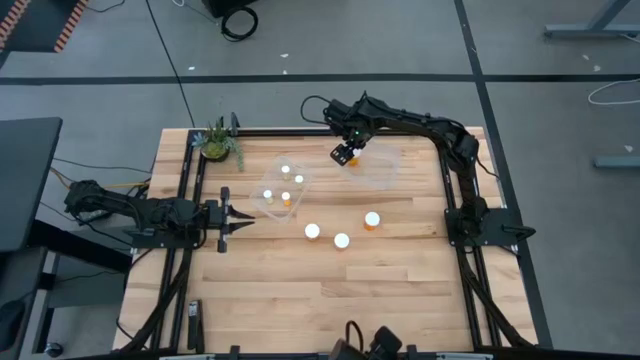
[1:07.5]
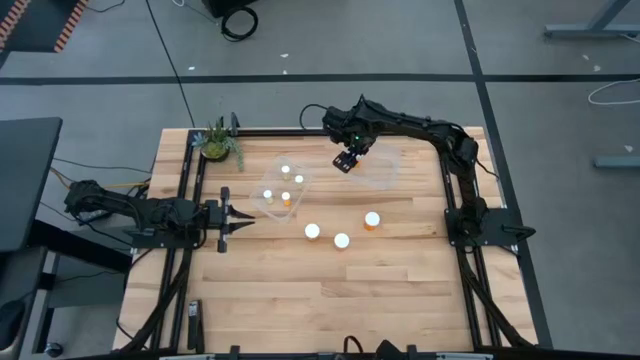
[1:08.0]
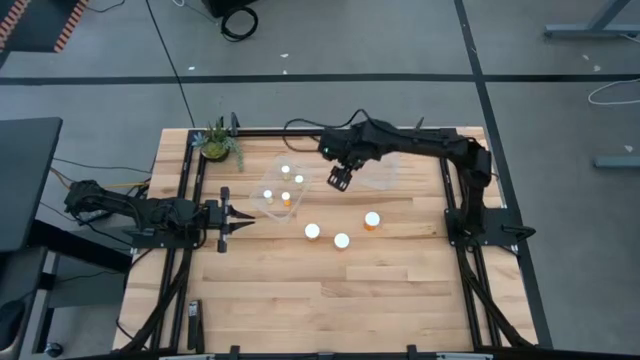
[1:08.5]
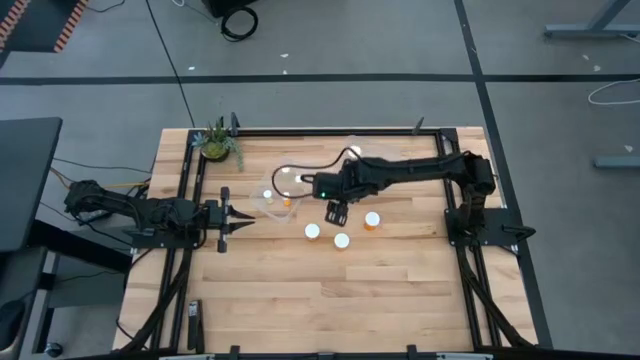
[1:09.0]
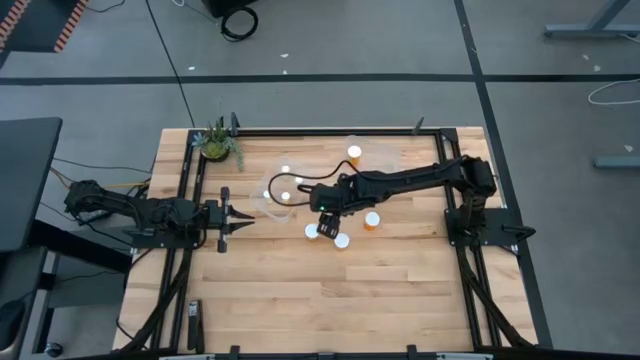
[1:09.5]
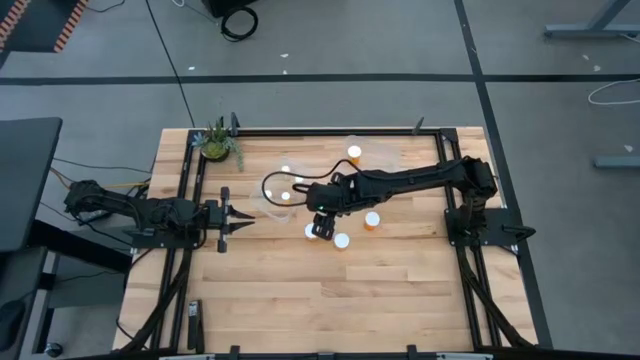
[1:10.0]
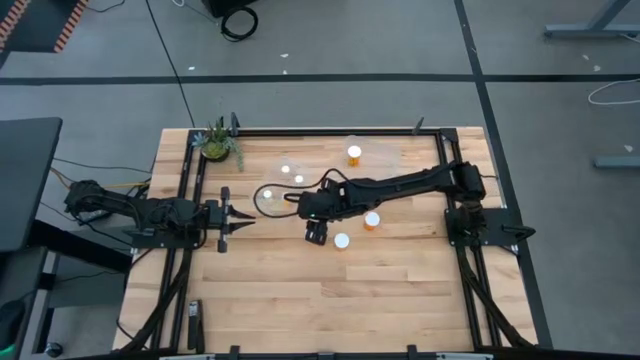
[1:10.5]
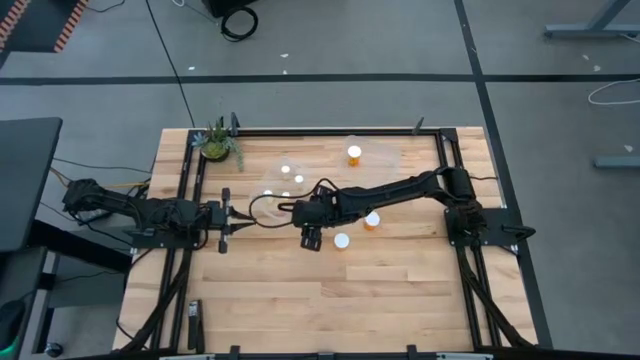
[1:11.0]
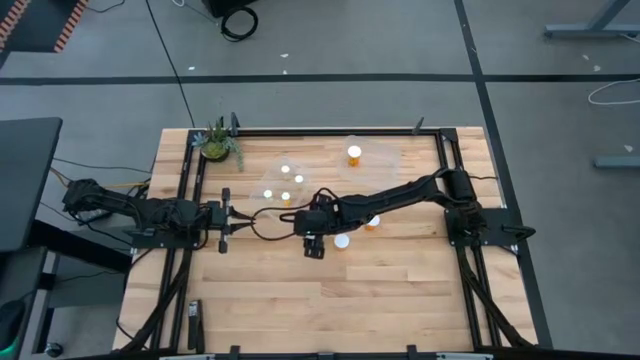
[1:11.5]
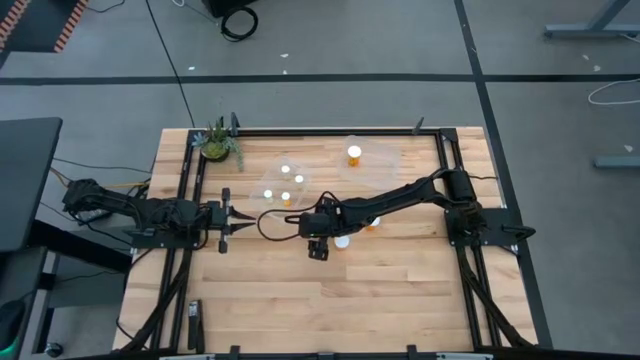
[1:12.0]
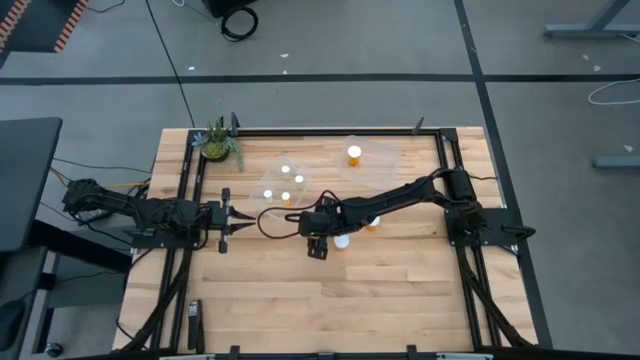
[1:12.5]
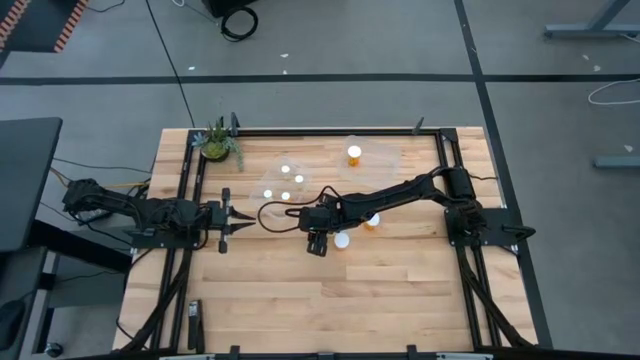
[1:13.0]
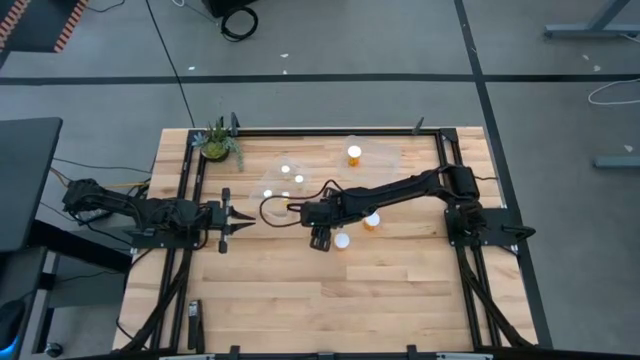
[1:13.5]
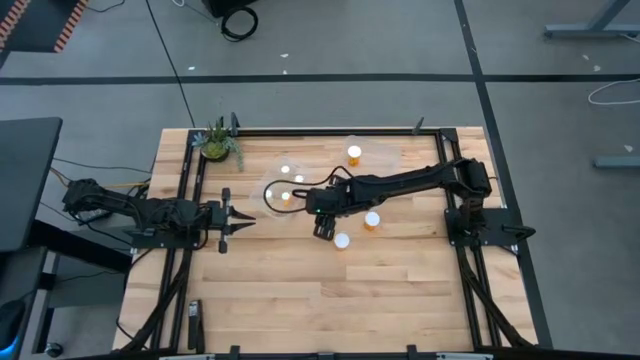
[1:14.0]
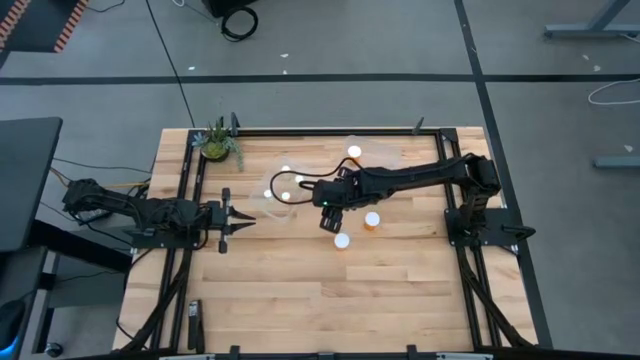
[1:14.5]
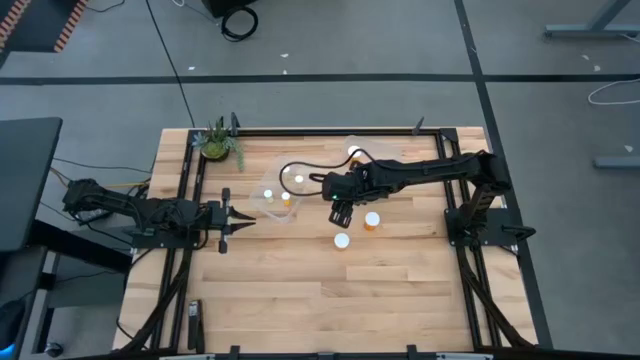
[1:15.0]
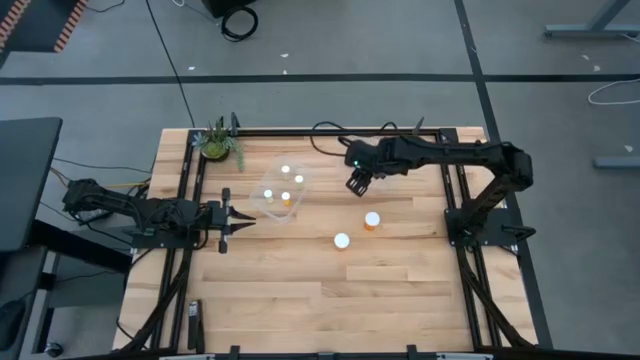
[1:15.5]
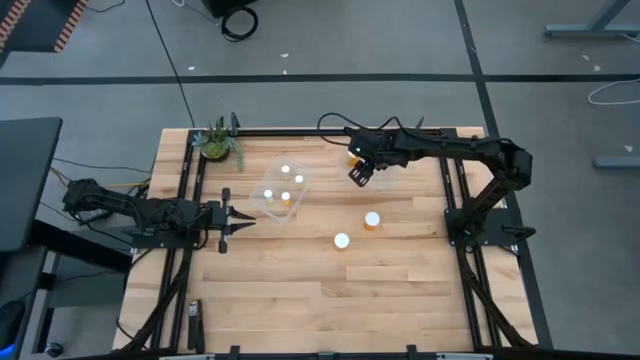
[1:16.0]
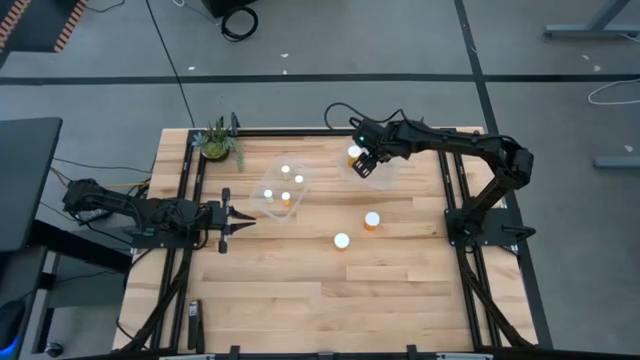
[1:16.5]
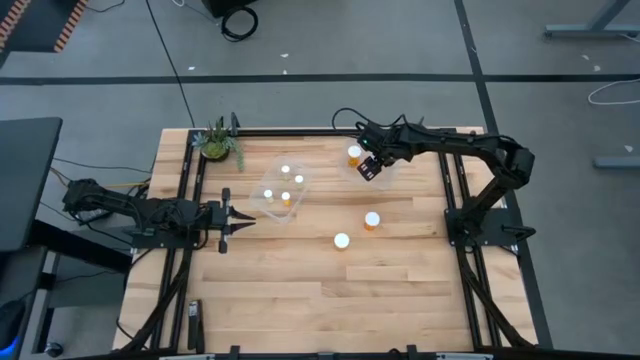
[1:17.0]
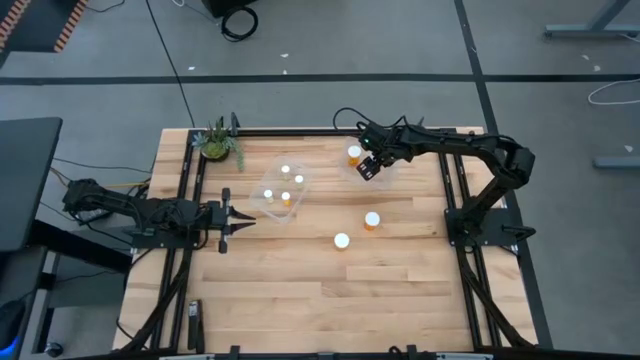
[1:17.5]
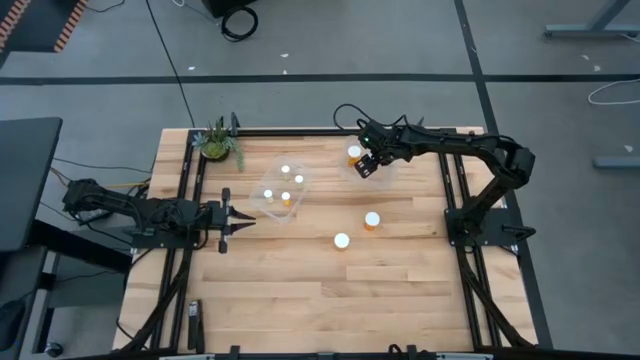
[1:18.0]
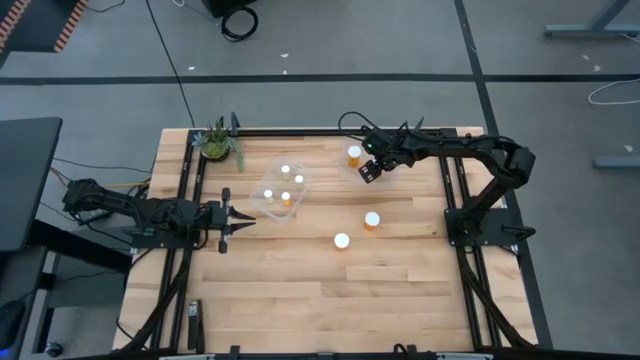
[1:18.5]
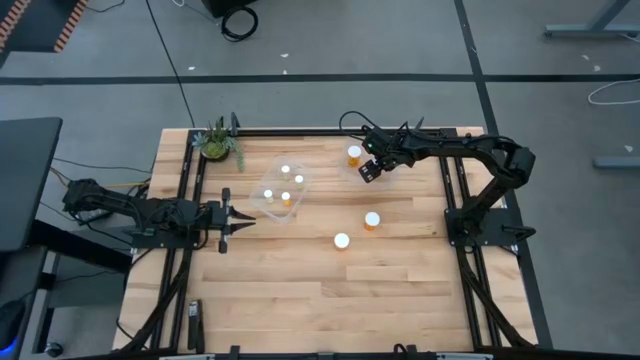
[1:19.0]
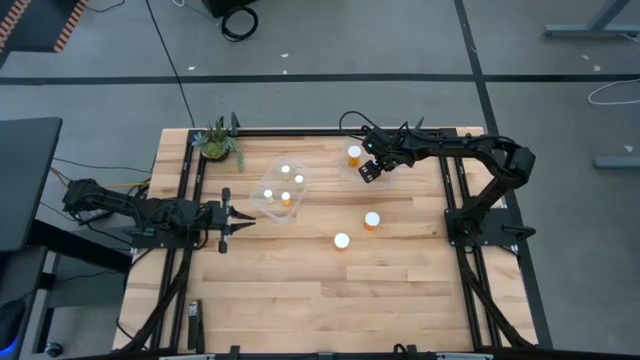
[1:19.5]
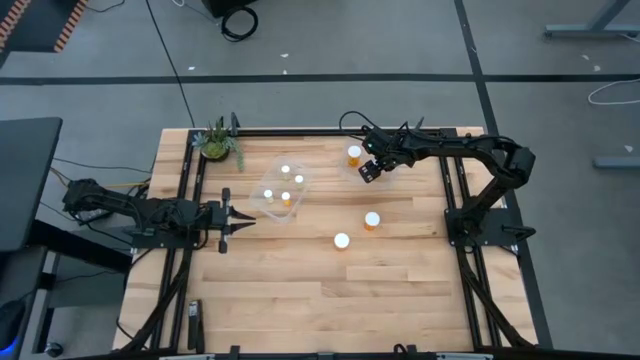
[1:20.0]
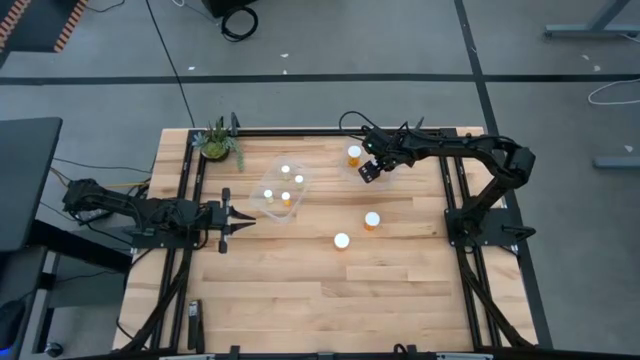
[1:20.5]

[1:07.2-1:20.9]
Task: Pick and place medicine bottles into bin by pill shape (circle, oval)
Put the large orange pill bottle into the right transparent bin

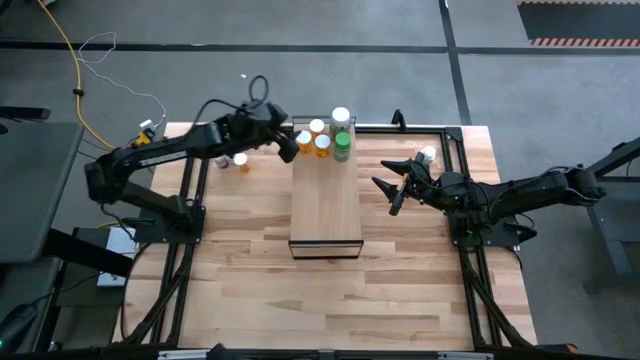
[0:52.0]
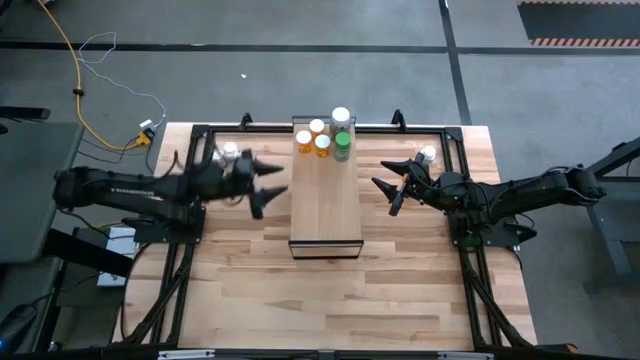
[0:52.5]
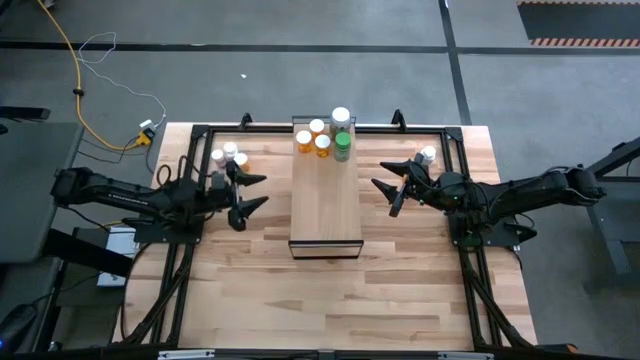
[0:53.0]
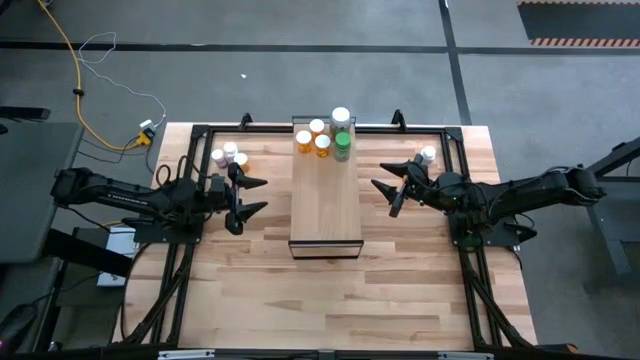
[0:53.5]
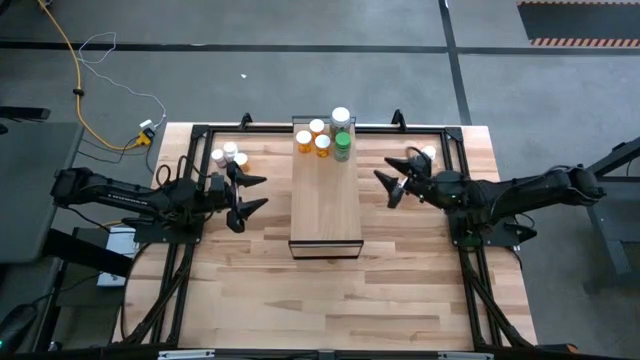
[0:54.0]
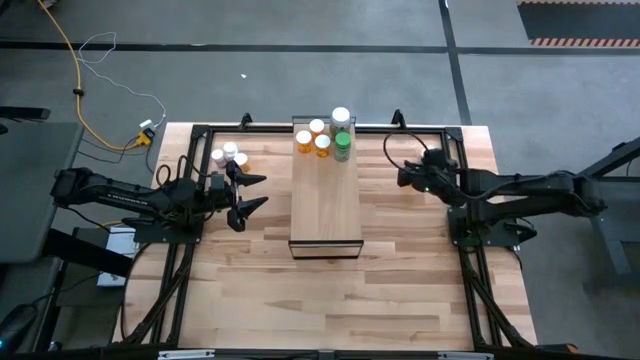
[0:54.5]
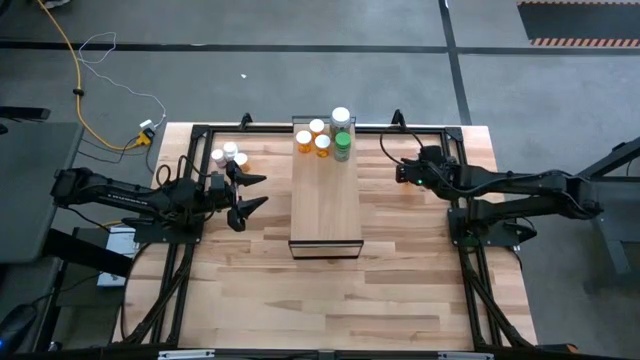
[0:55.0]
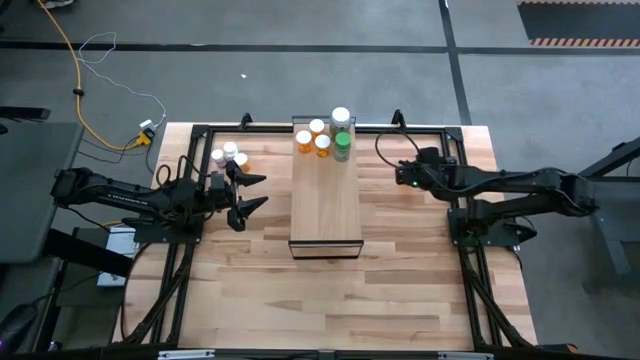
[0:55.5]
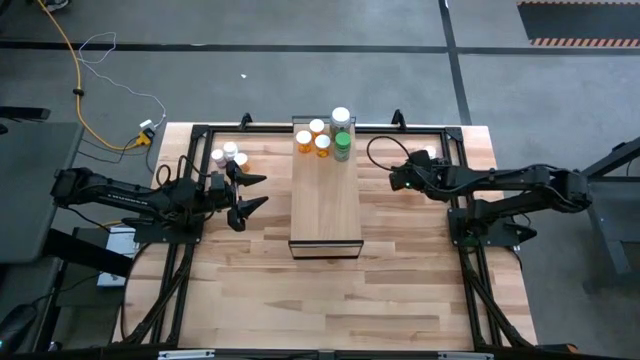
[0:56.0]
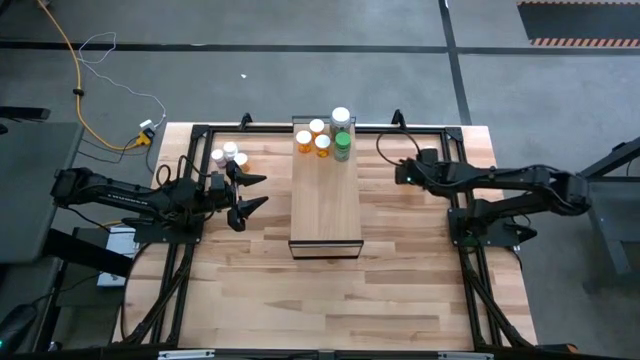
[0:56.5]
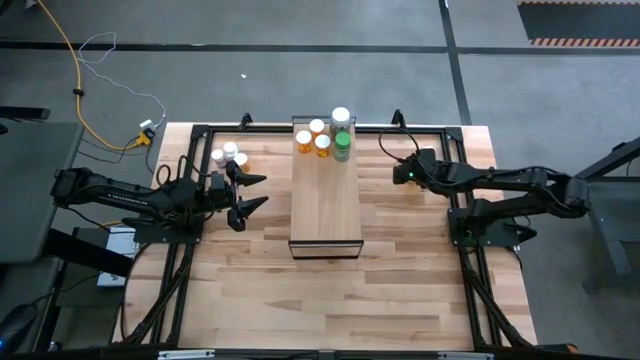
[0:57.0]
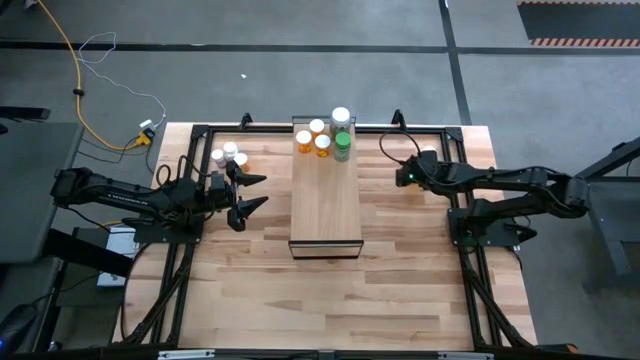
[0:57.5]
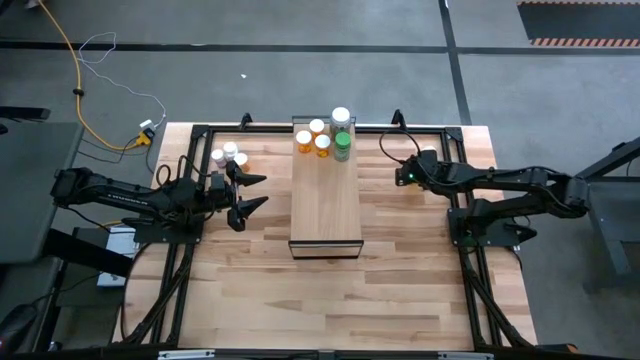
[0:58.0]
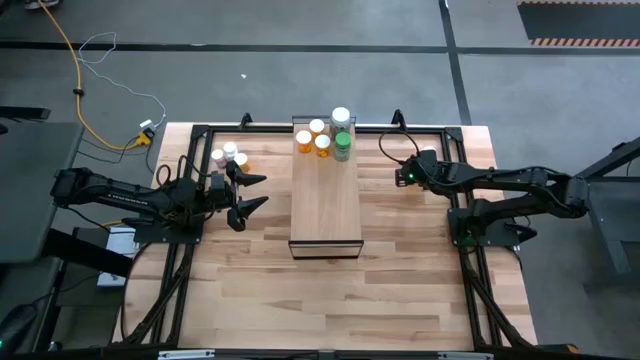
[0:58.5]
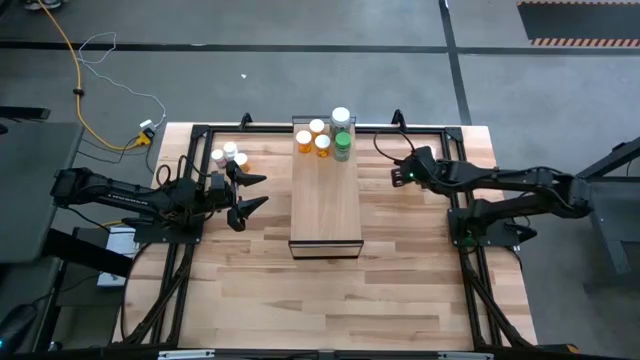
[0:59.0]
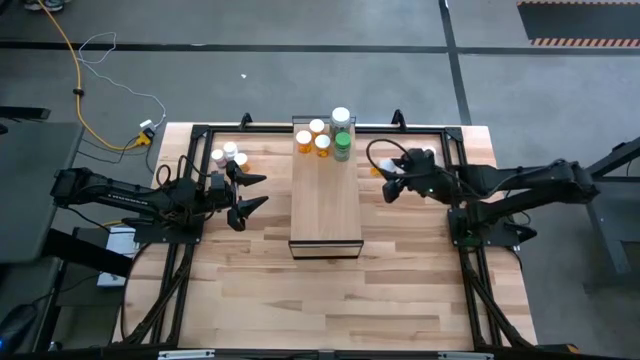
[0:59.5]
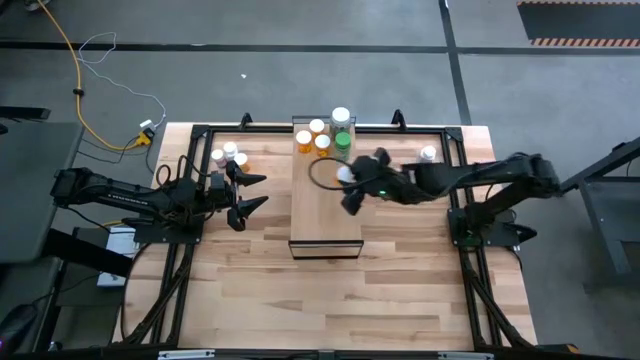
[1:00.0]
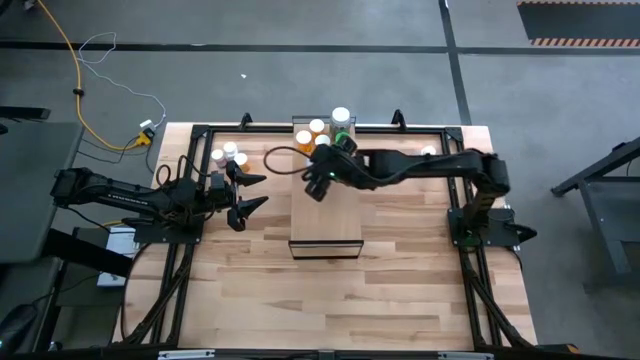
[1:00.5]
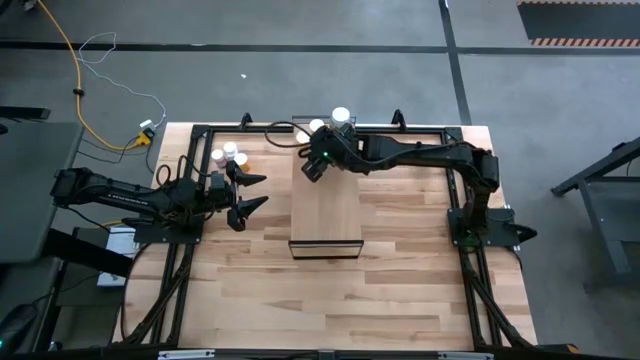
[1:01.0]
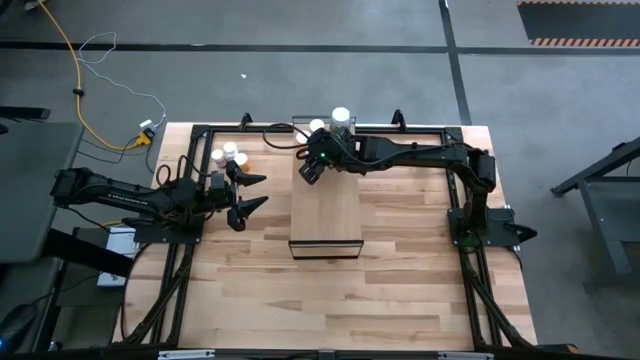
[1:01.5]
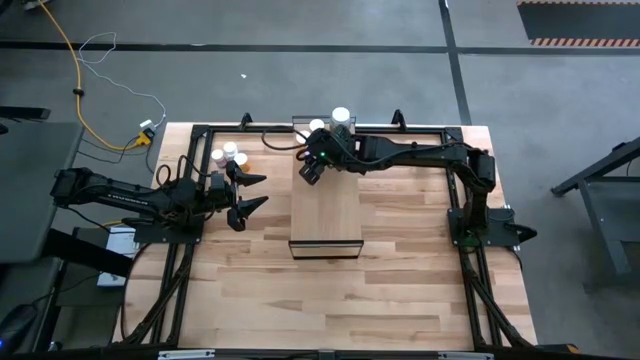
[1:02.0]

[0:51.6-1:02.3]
Task: Pick and place medicine bottles onto shelf by color
Put the right yellow pill bottle on the shelf
